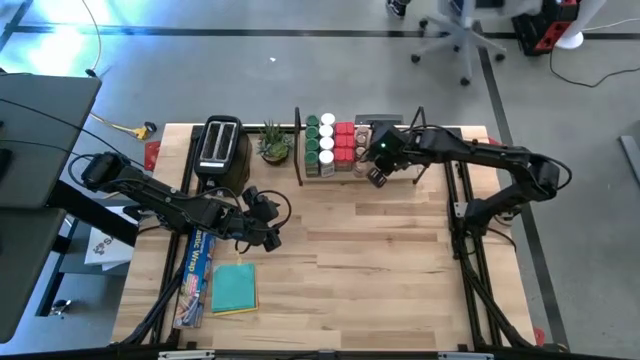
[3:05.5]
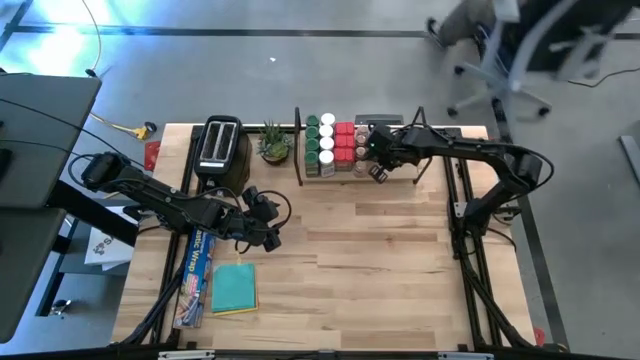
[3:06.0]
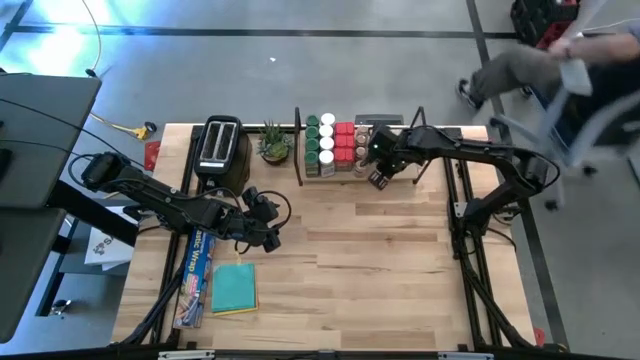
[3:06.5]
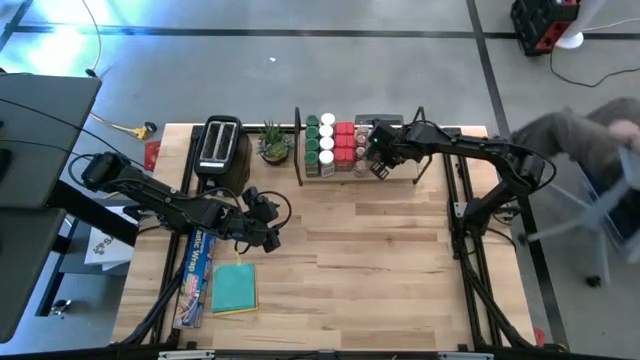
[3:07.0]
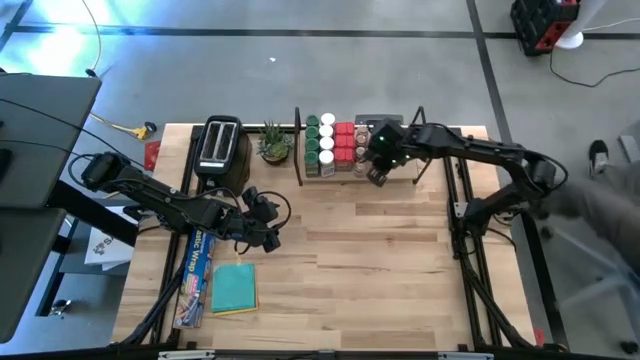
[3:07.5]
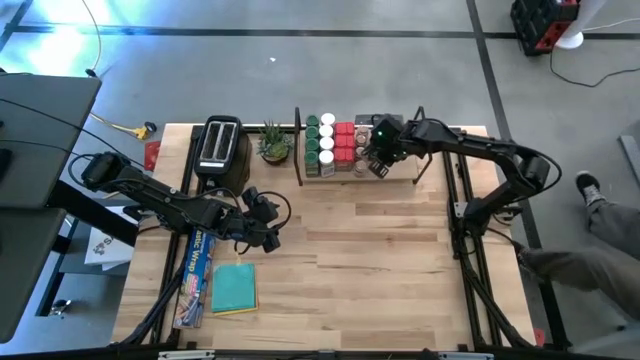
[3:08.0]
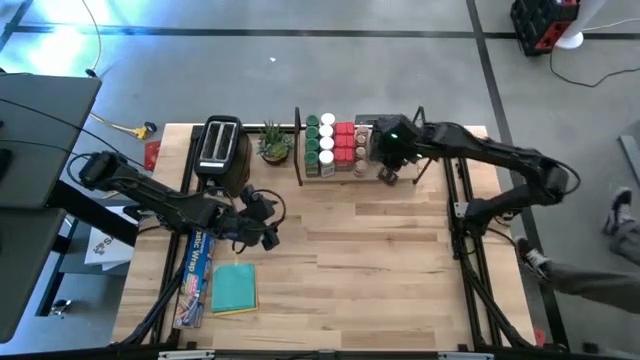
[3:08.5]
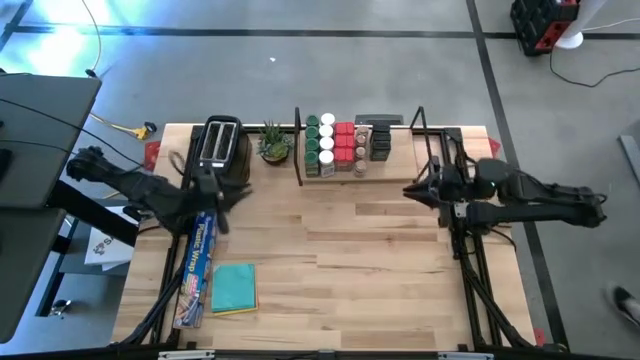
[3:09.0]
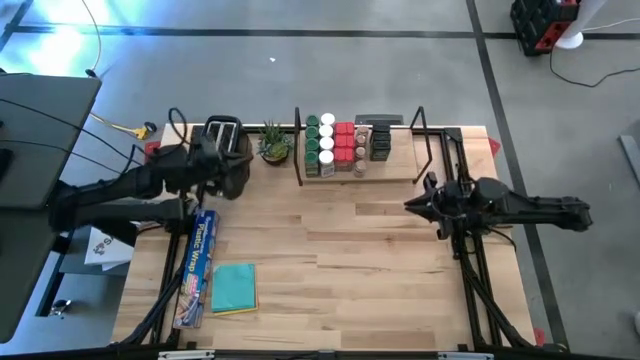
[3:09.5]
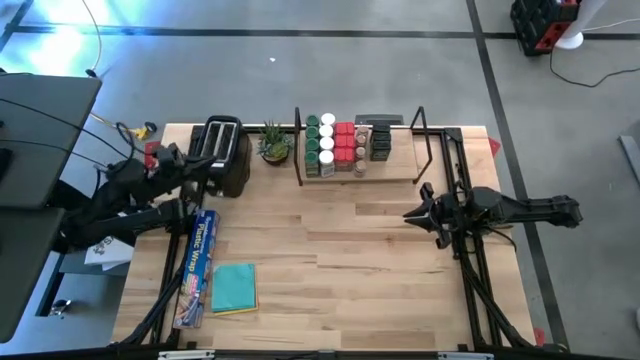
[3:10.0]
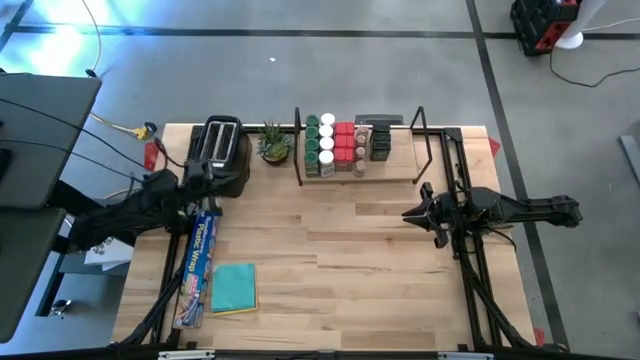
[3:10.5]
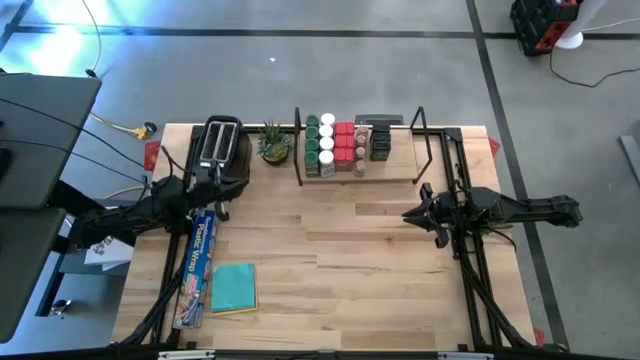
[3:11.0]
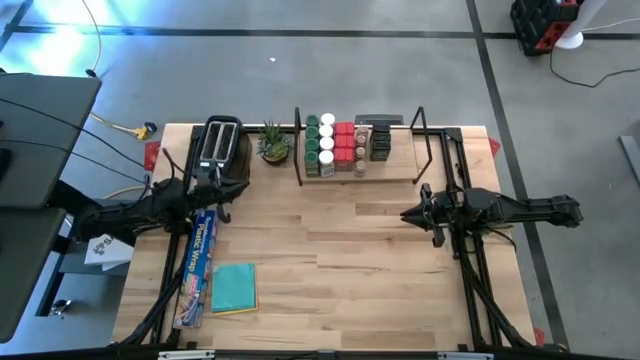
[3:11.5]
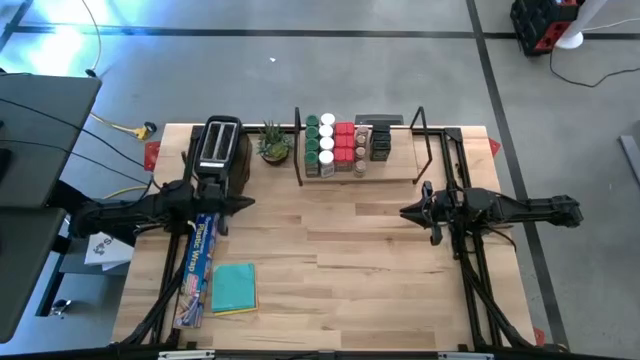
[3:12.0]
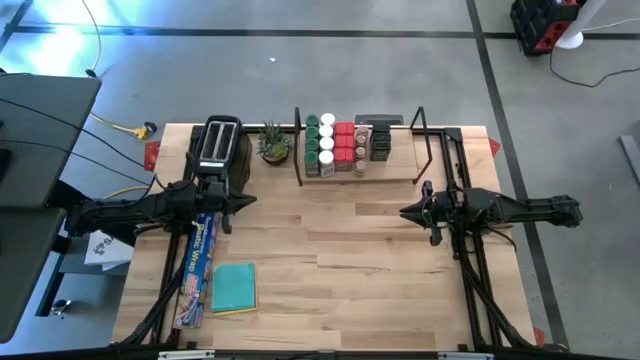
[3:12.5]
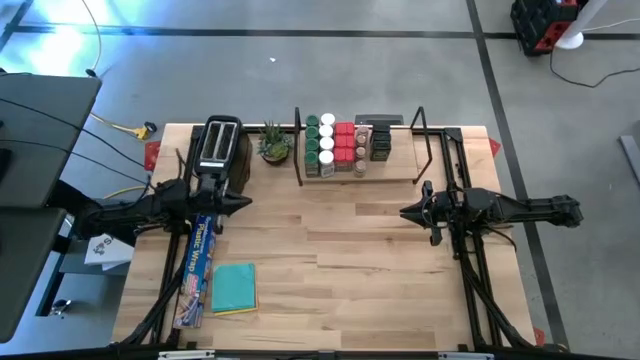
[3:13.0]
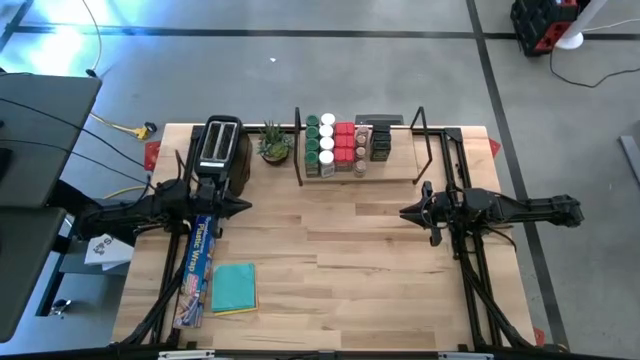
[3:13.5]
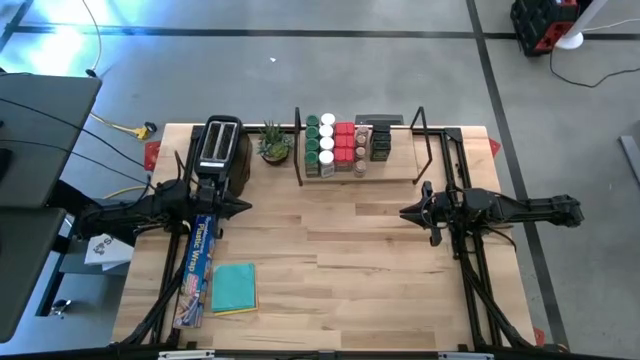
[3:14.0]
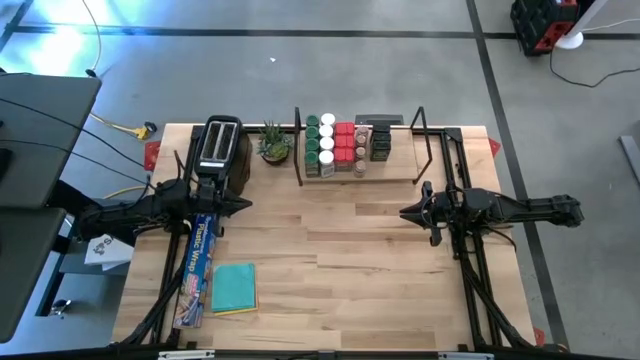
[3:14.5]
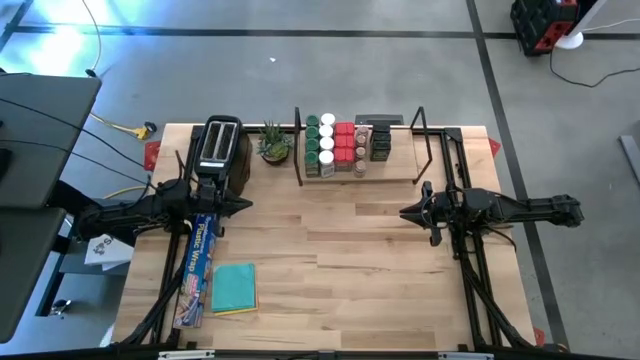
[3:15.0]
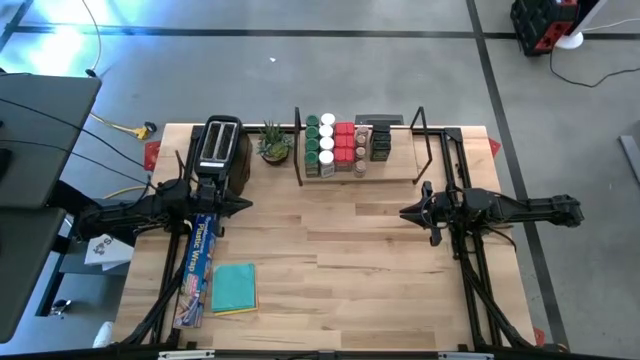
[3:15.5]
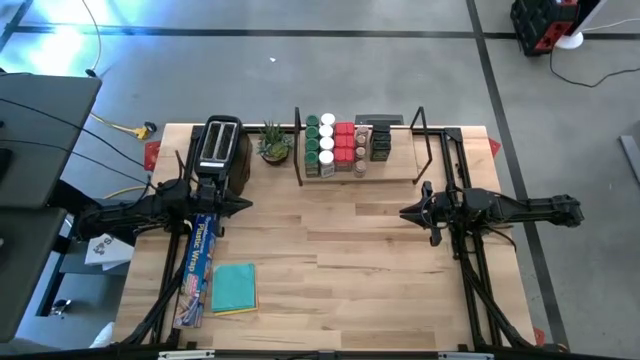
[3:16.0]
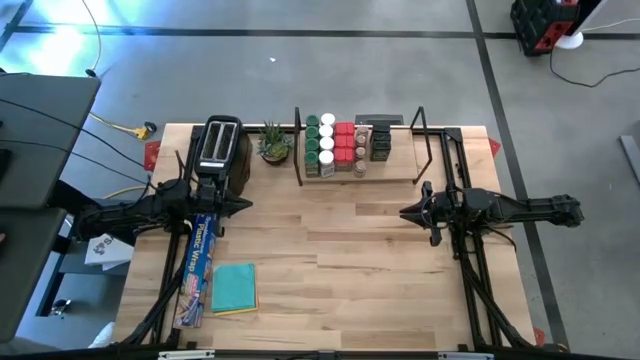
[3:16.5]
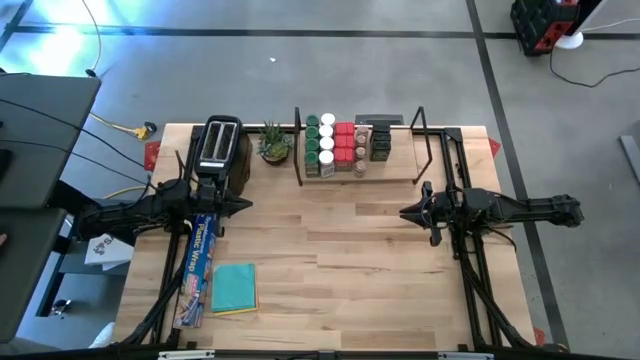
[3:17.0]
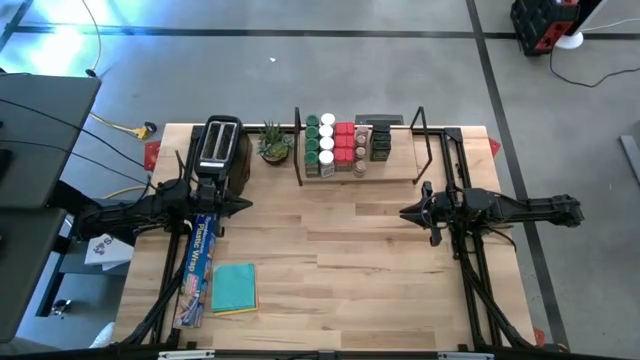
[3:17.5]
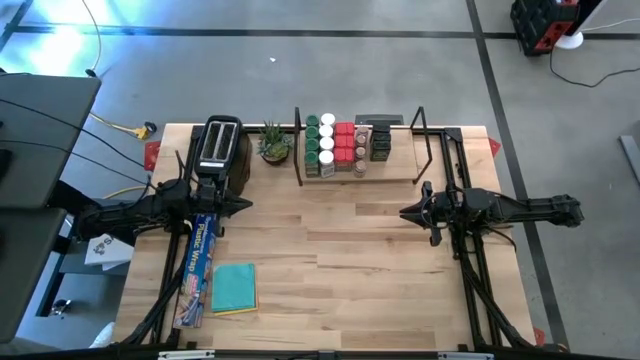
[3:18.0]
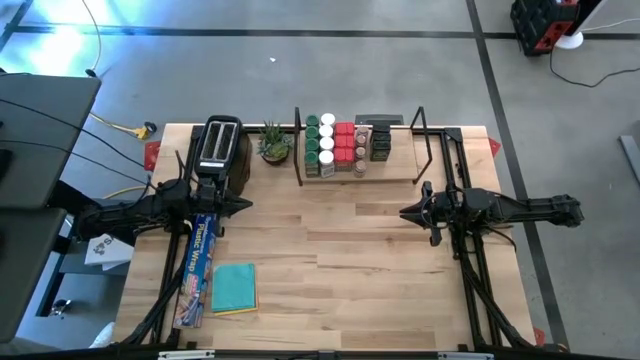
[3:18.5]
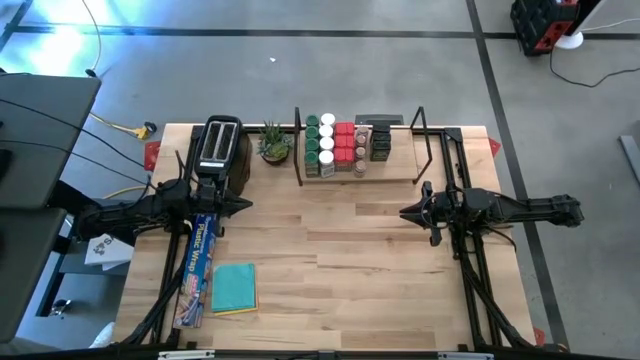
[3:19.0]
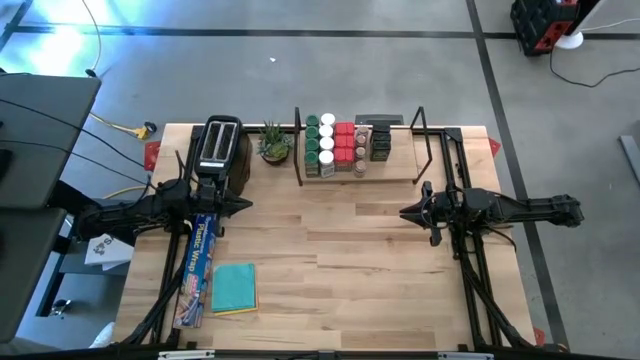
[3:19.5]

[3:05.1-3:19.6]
Task: Shelf spices
Return to Home Position

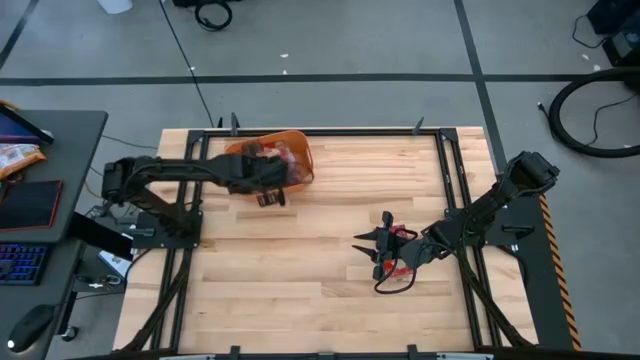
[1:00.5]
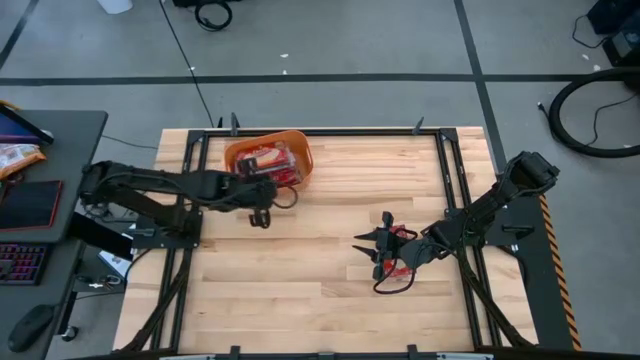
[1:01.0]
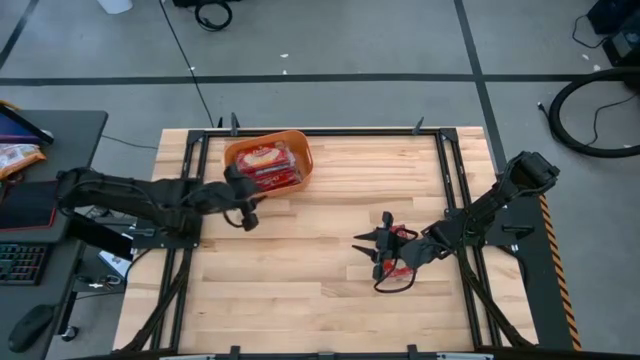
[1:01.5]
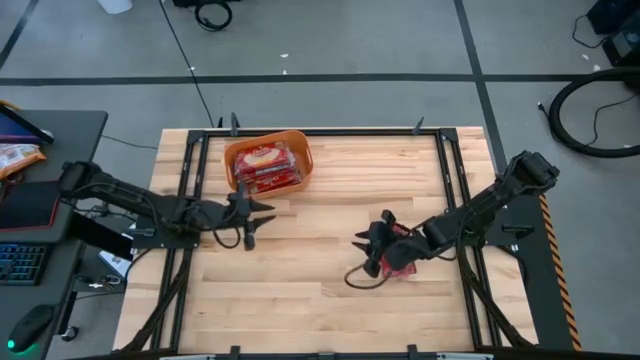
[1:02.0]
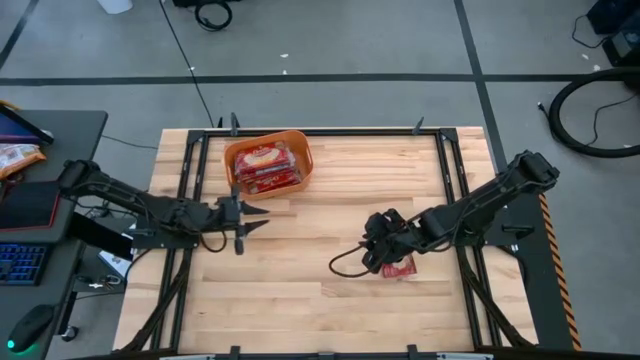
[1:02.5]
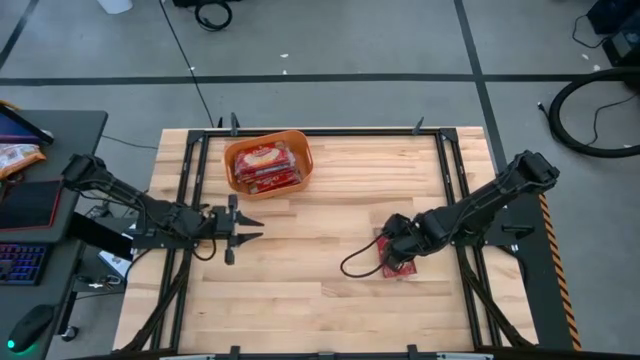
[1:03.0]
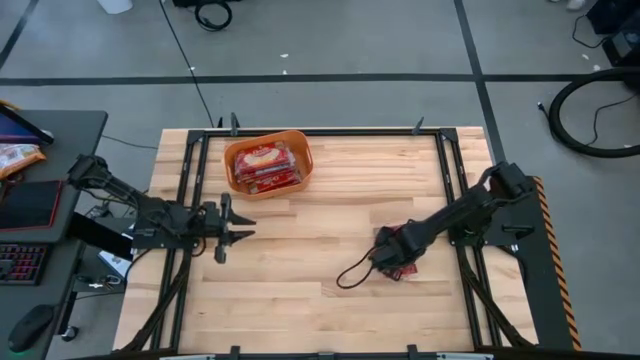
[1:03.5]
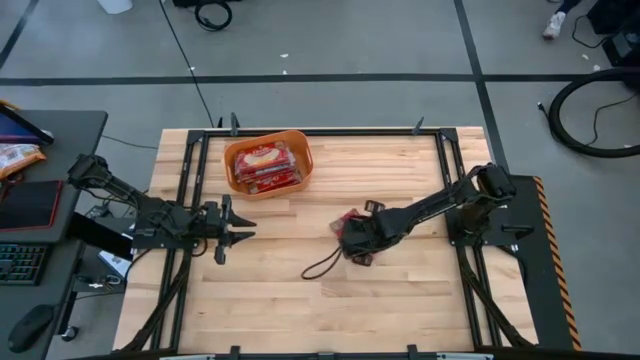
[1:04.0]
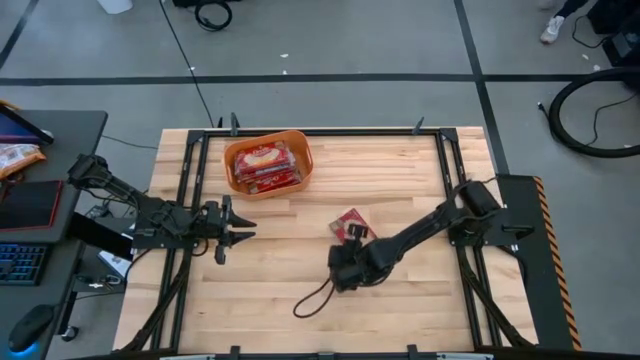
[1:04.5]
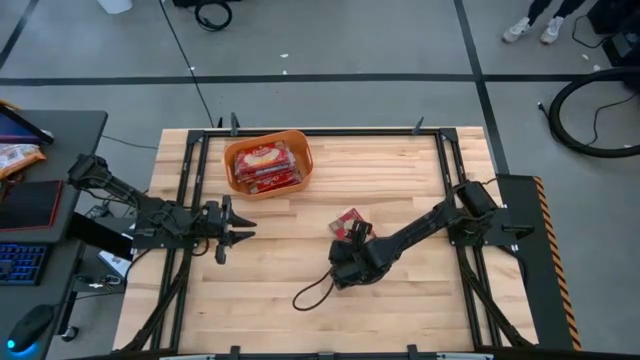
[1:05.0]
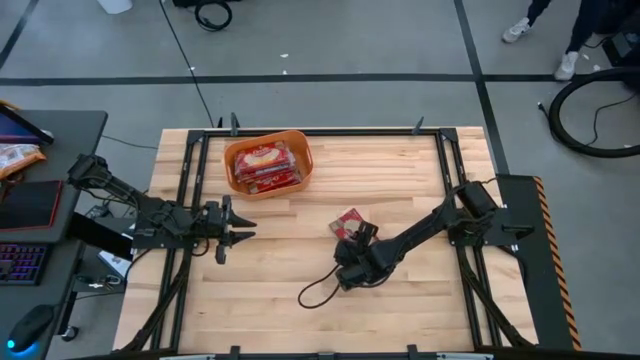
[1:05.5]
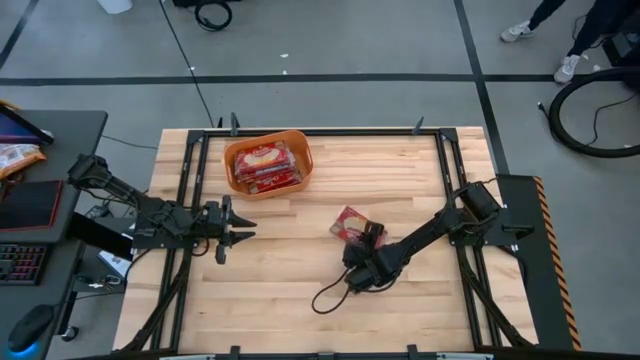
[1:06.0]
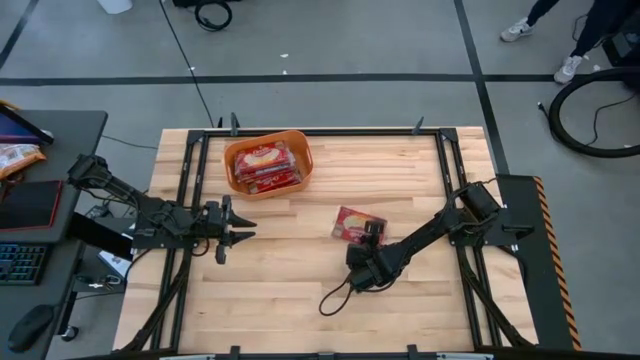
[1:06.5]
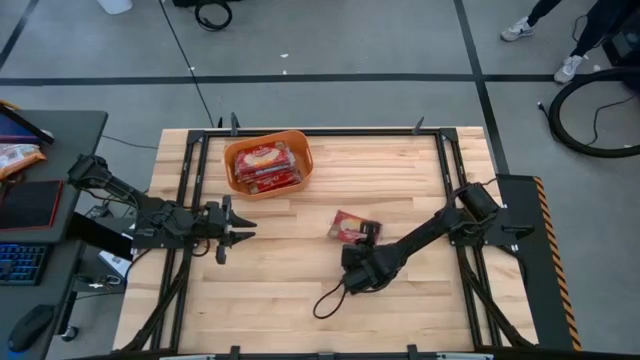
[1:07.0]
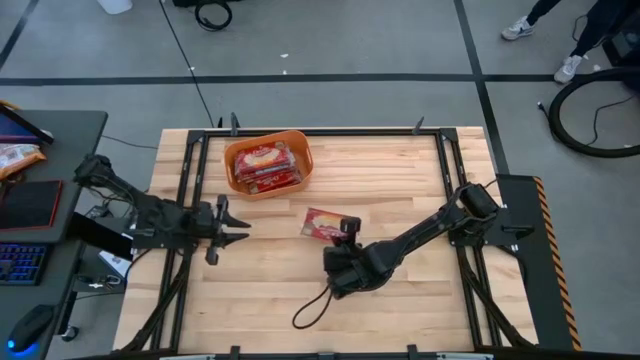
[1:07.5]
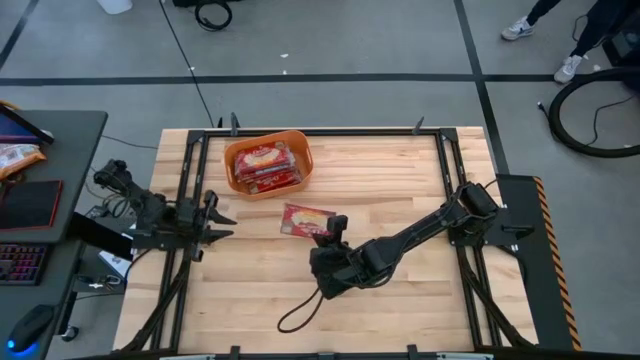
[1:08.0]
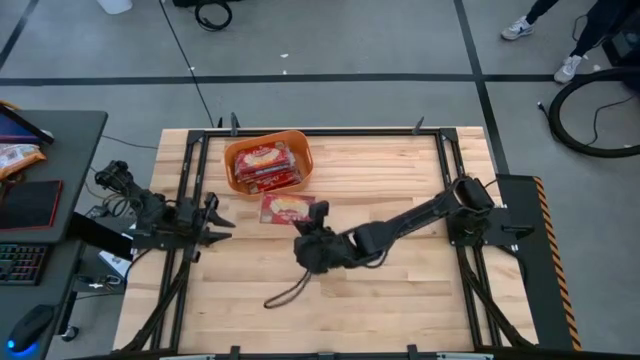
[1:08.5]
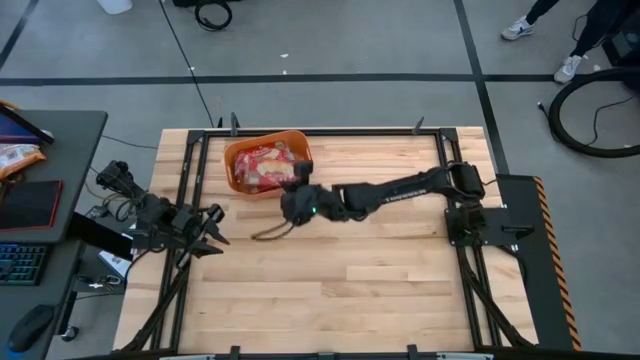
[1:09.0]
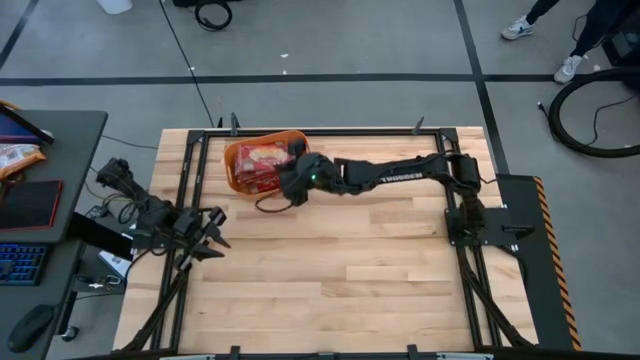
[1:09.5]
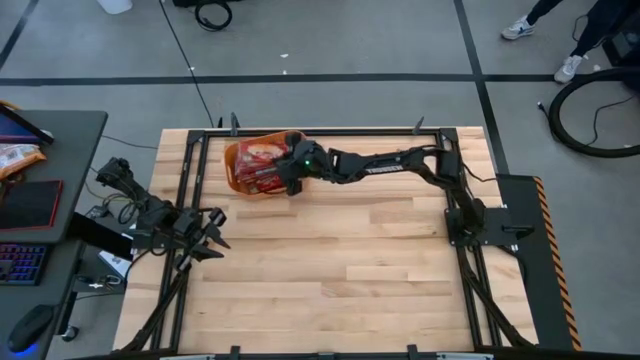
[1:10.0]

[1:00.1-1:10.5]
Task: Sort popcorn bags into baskets
Put the red popcorn bag into the orange bin
